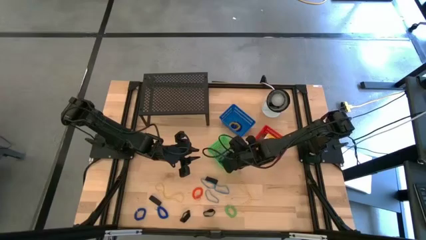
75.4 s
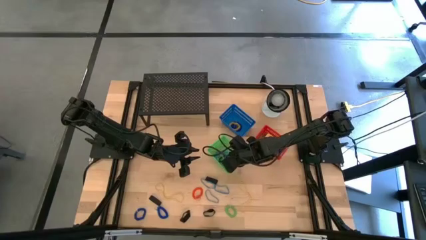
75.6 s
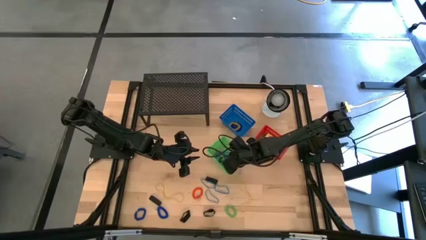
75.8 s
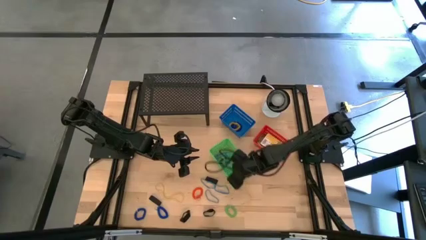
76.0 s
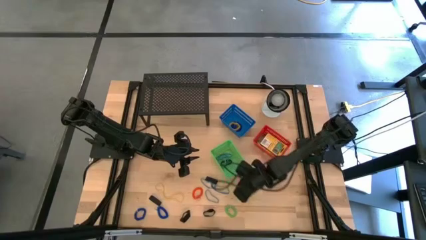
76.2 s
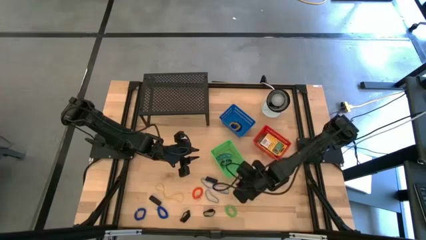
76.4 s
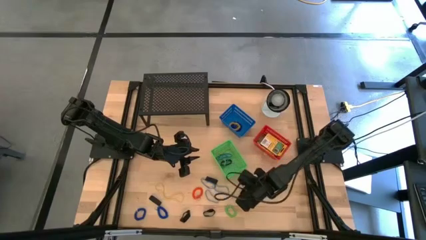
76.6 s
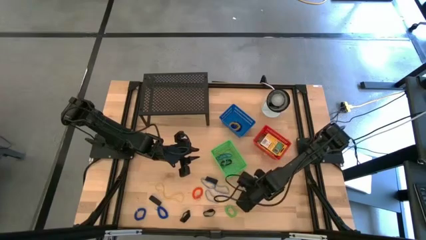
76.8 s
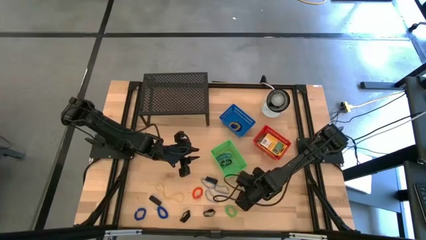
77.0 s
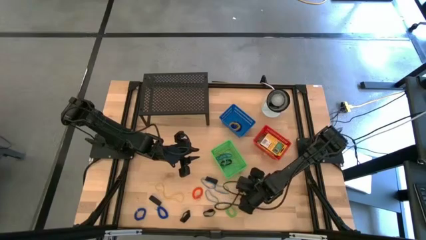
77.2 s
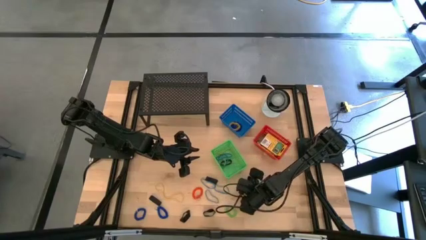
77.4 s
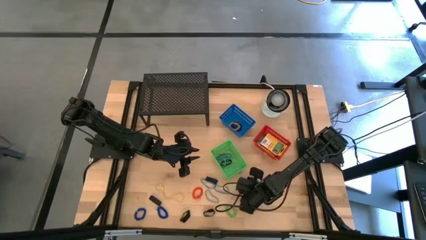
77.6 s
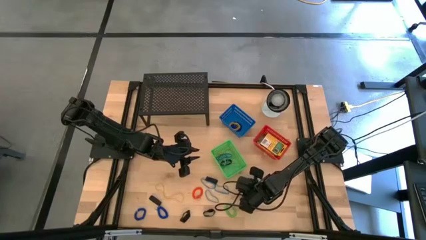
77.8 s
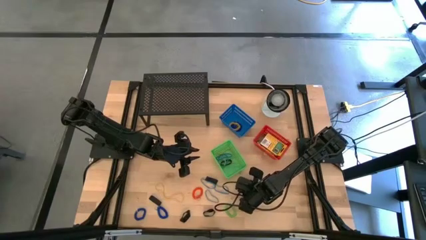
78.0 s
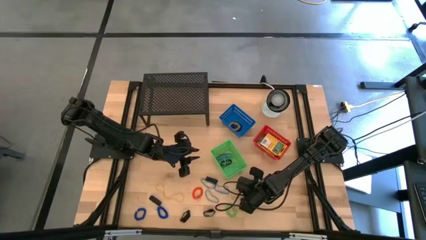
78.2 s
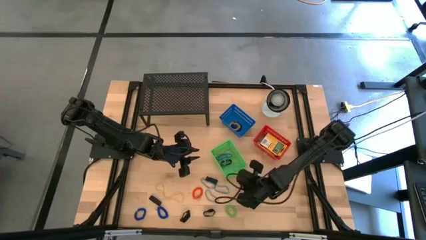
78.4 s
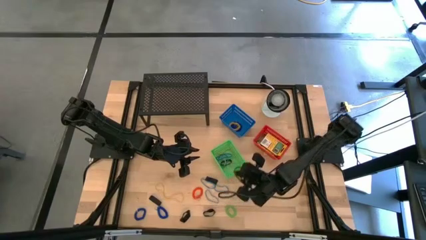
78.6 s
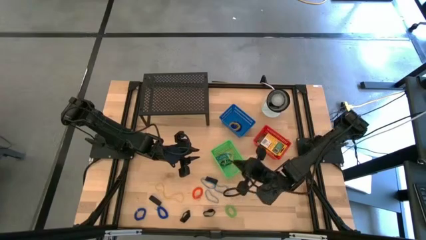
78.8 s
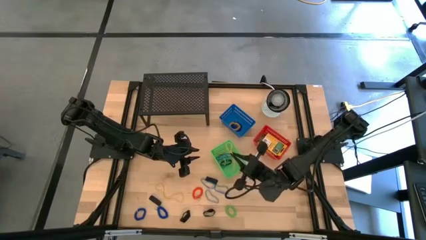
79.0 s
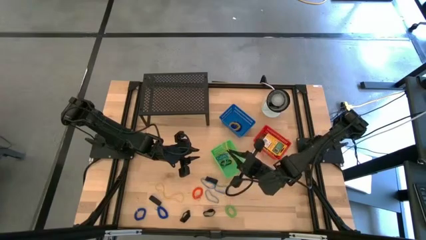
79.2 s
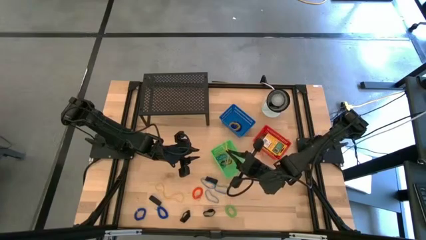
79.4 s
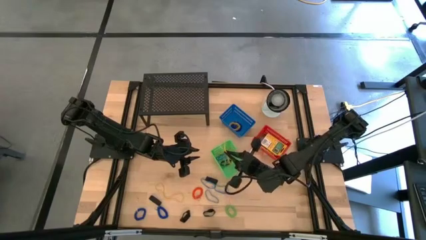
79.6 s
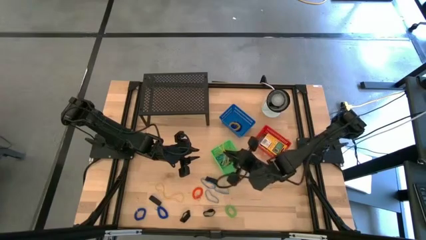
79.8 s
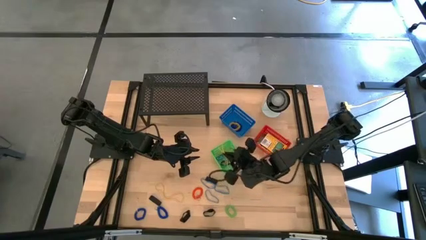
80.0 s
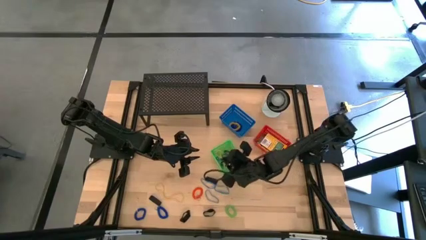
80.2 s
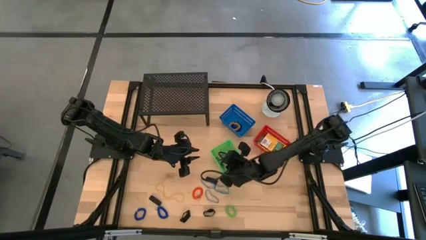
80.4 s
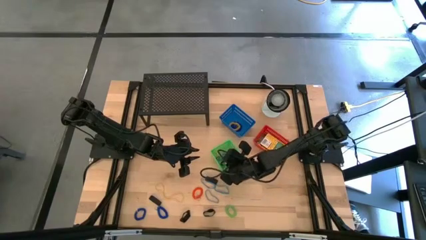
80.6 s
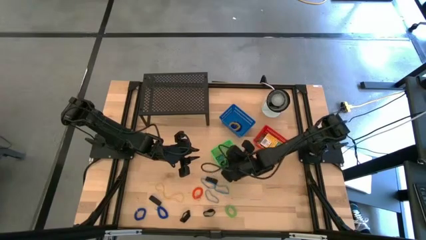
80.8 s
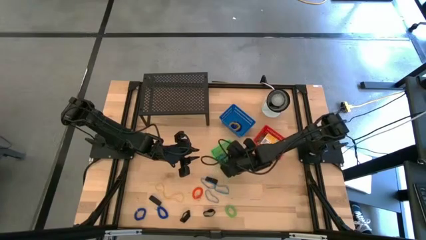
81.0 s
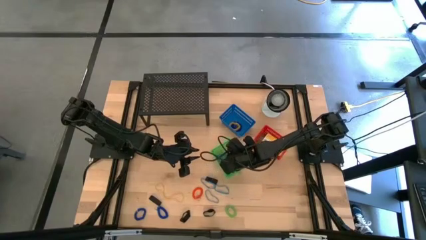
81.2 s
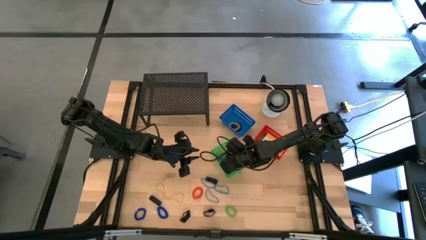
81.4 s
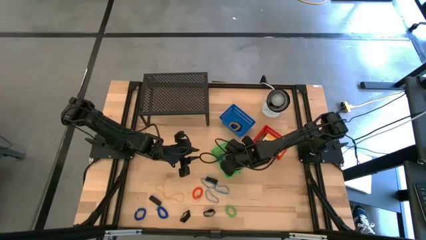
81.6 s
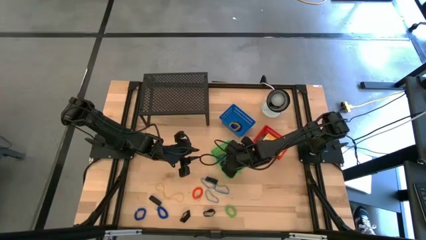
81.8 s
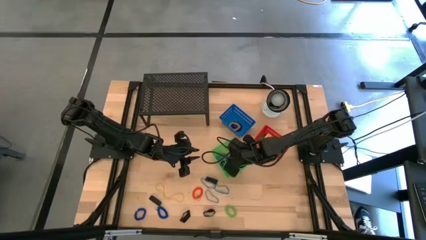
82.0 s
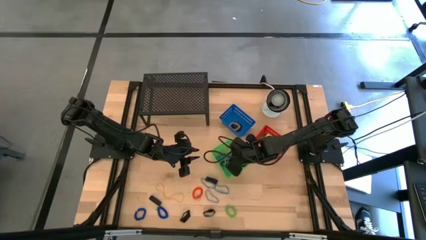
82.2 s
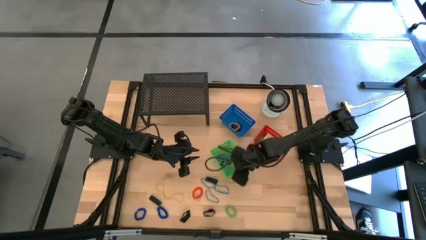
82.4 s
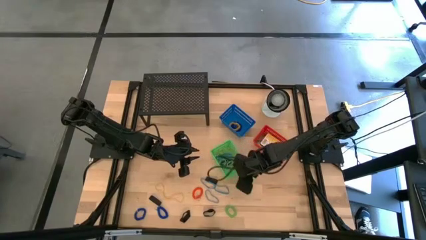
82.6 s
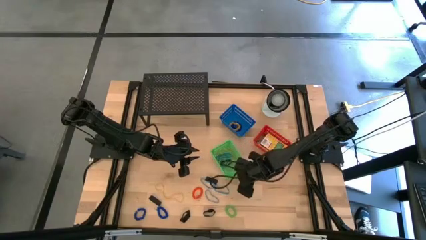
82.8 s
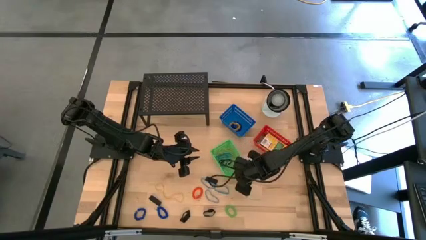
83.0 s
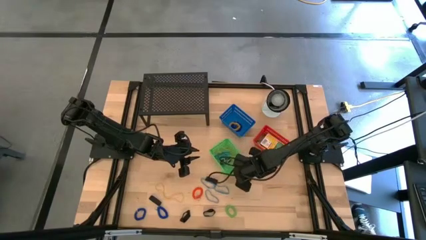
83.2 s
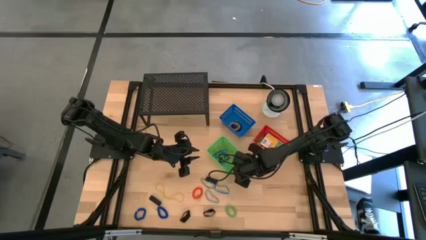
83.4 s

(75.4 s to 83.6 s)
Task: Pick & Place Office Desk Supplies
Put the yellow rubber band into the green basket

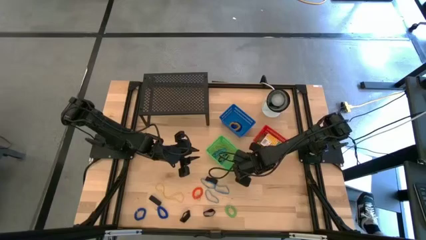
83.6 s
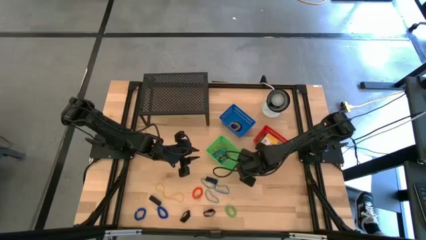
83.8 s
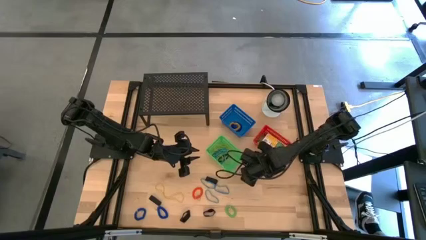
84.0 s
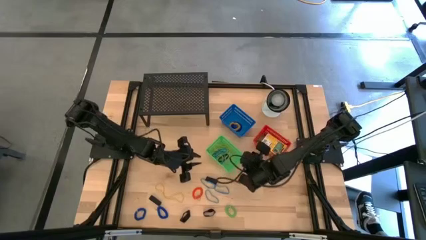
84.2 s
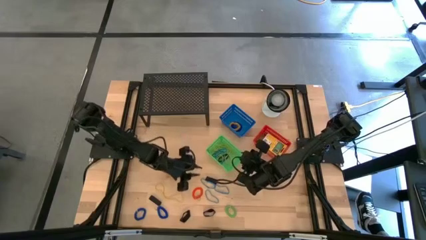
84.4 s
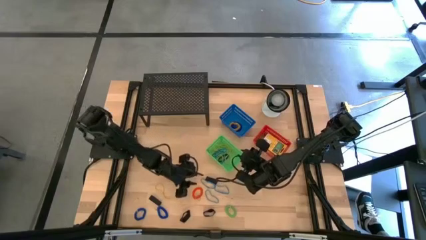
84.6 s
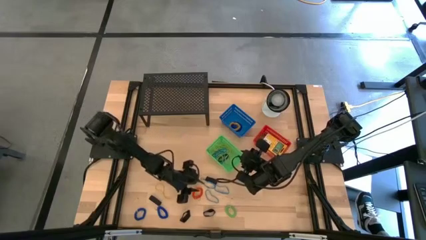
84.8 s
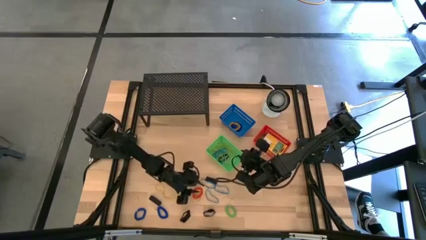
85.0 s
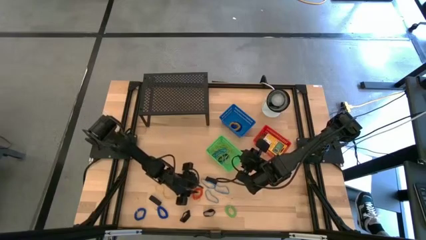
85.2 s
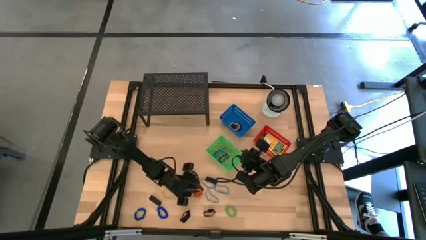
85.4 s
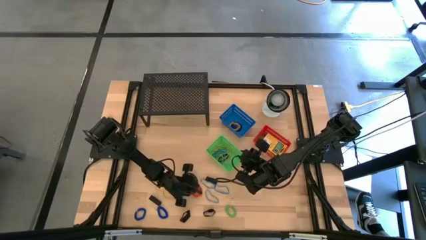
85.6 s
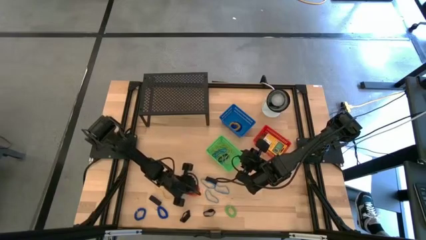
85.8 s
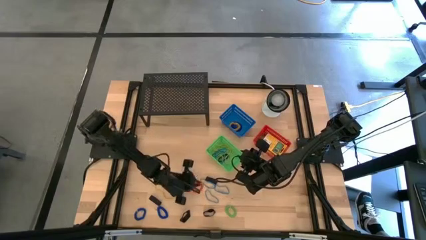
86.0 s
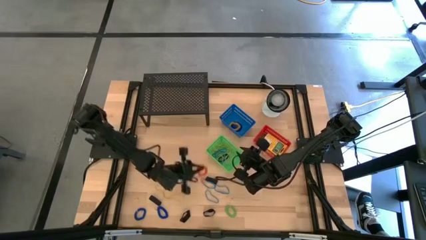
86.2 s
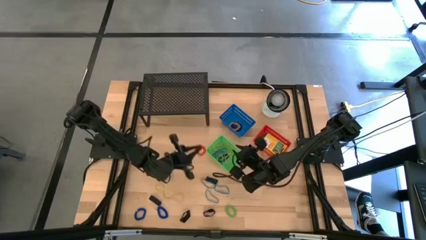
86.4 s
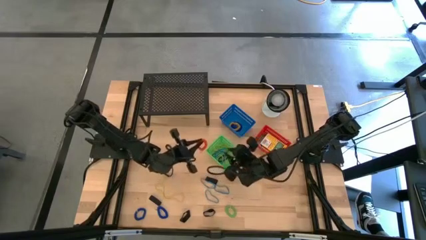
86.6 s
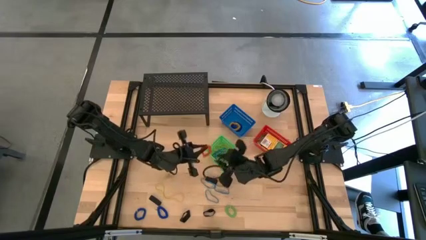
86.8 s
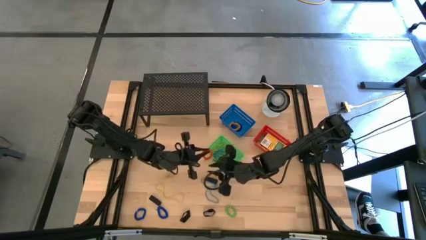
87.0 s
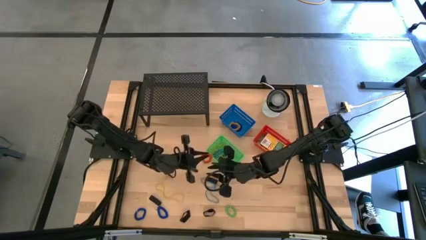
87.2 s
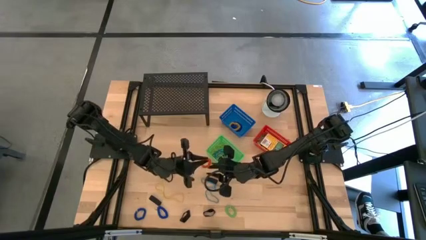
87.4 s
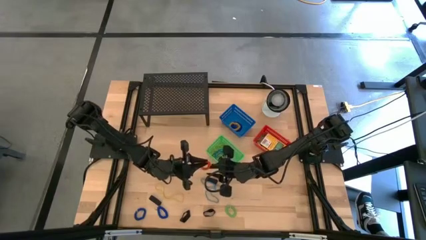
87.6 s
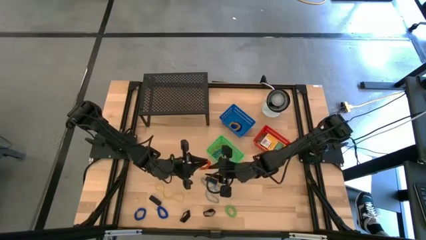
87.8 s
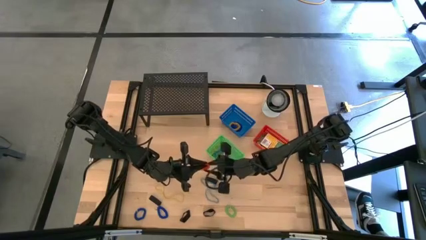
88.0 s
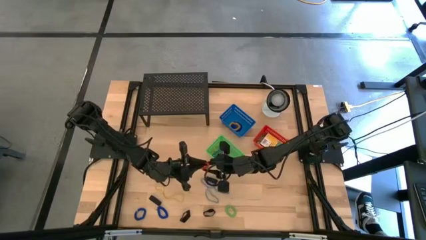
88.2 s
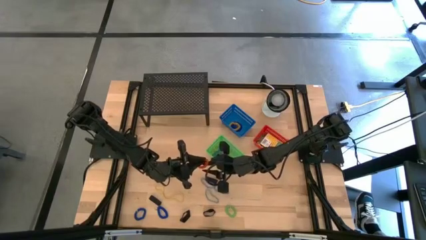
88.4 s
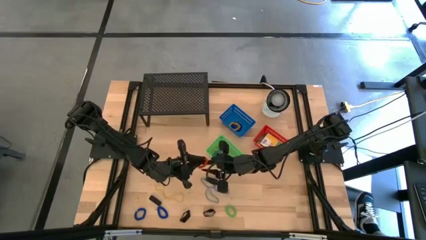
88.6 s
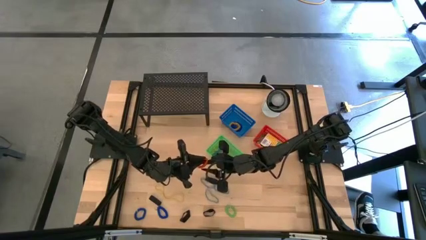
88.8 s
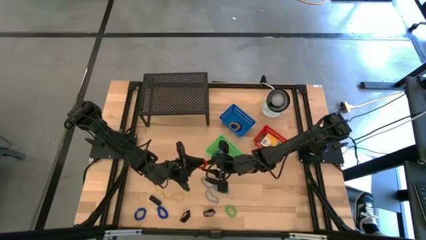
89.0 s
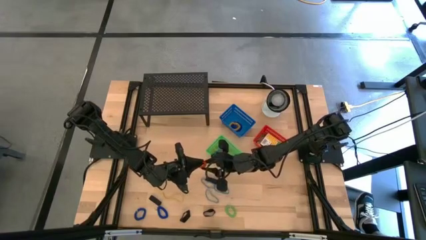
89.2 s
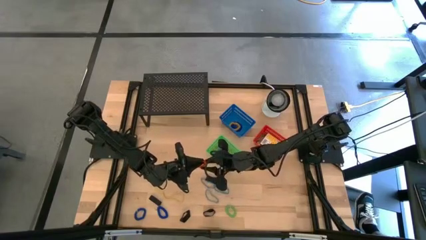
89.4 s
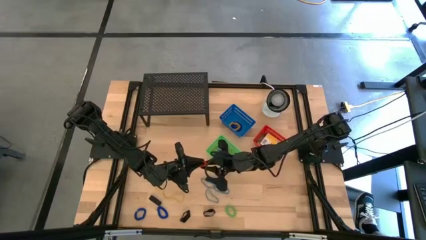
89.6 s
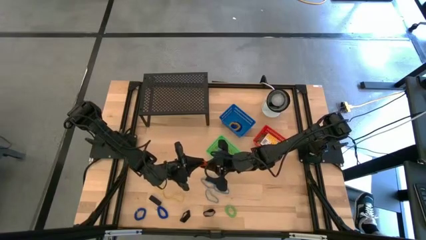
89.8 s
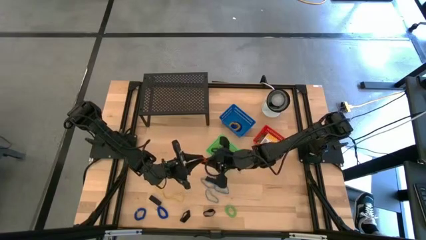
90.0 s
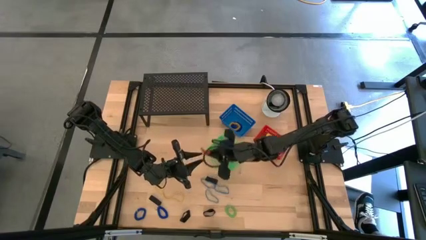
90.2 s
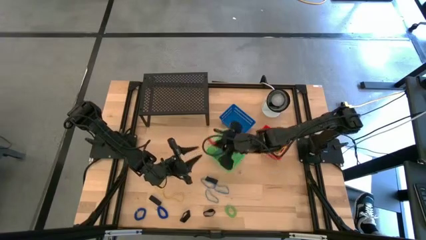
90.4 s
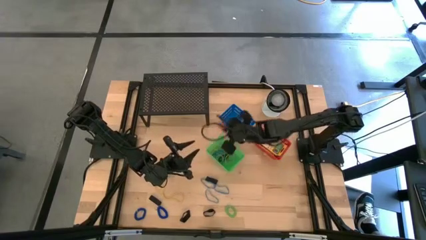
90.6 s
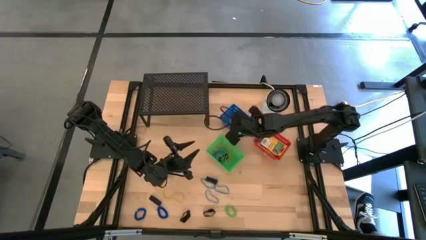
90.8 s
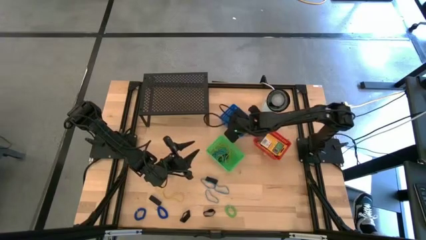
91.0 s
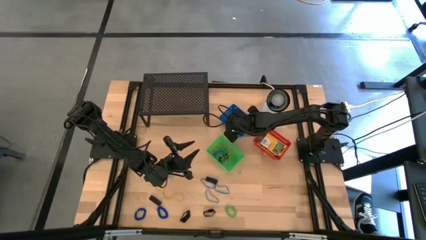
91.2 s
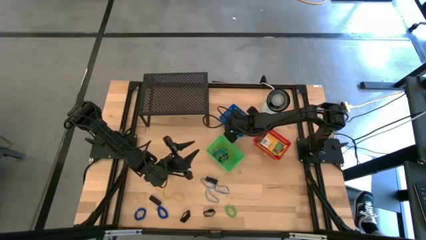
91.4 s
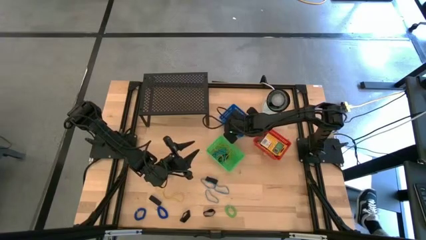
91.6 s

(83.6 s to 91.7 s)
Put the orange spring keychain into the blue basket

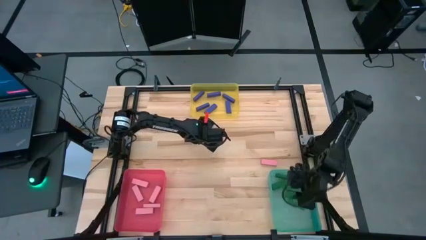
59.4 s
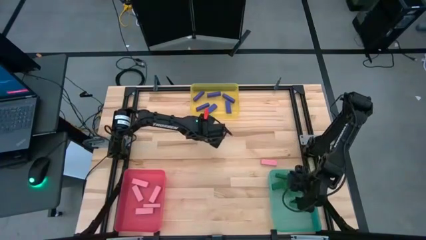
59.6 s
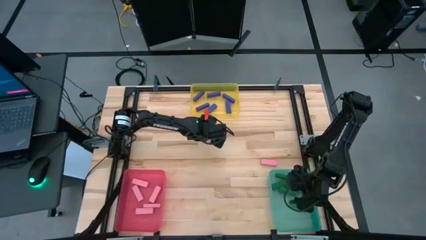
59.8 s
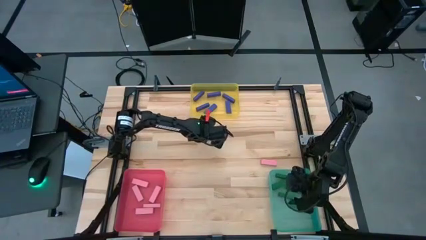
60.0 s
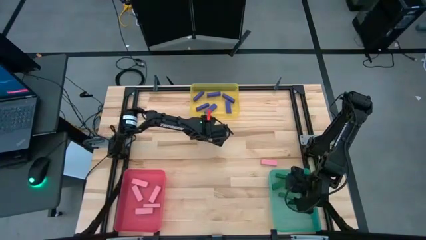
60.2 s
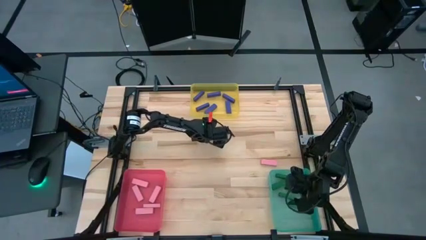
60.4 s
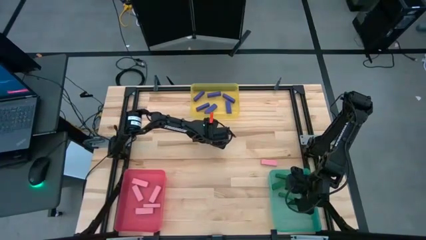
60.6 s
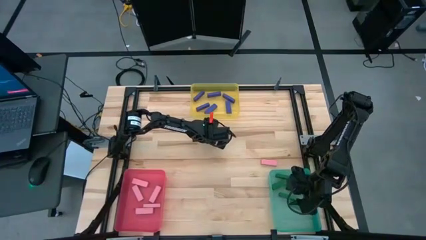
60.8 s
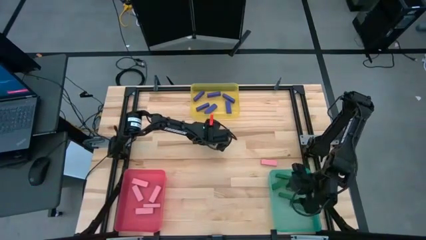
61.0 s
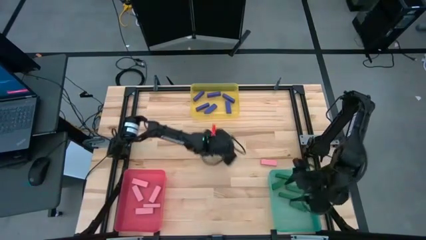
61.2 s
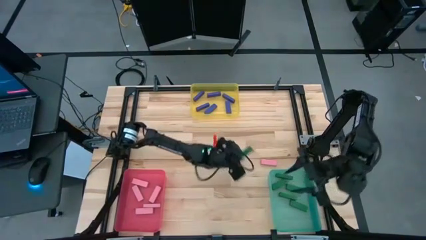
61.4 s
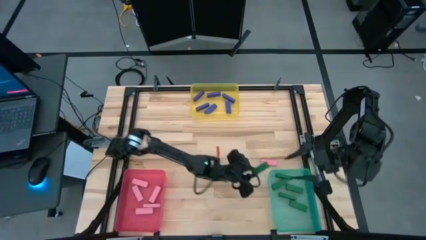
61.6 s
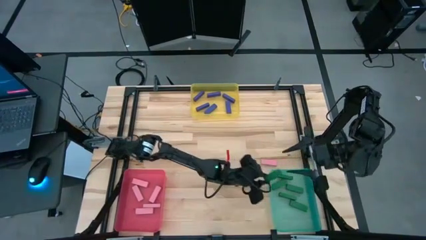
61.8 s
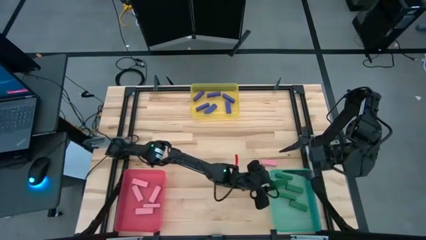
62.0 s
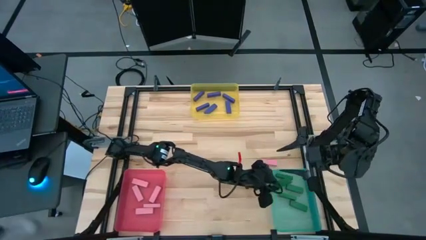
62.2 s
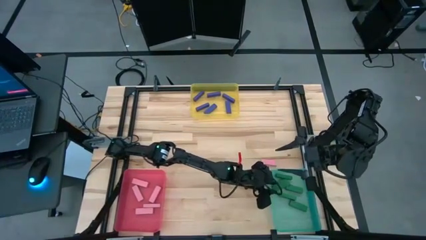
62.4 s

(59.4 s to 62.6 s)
Task: Sort blocks
Put the green block into the blue green bin
